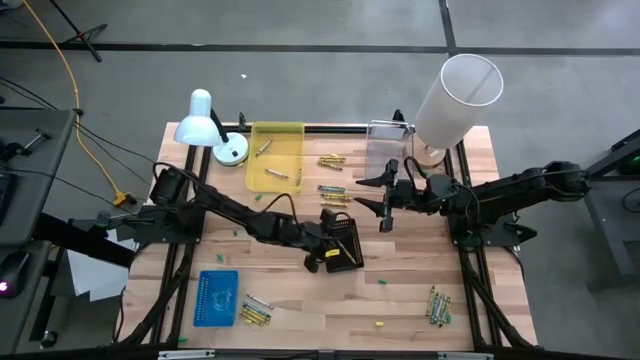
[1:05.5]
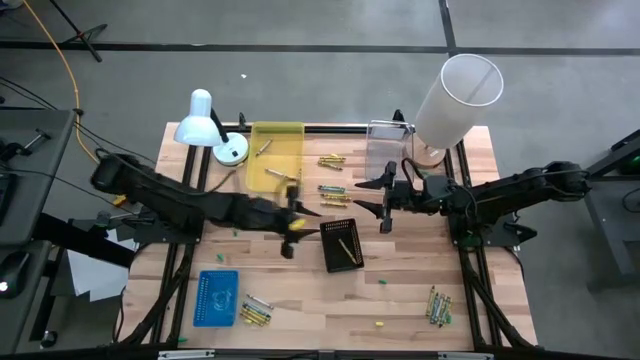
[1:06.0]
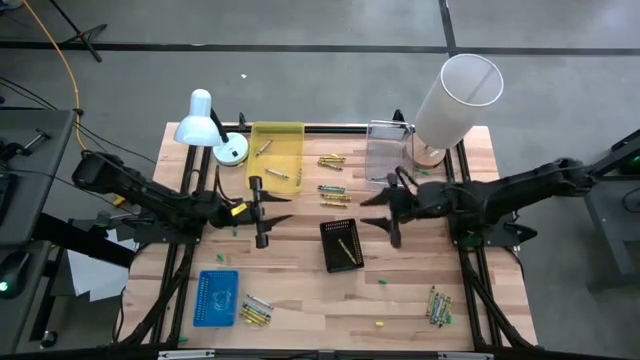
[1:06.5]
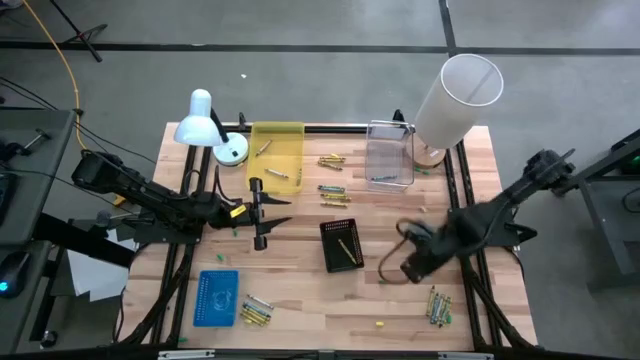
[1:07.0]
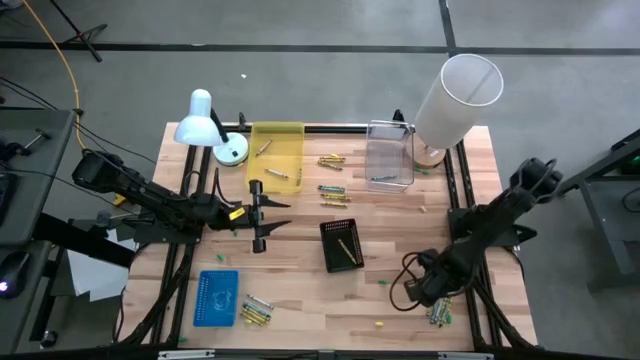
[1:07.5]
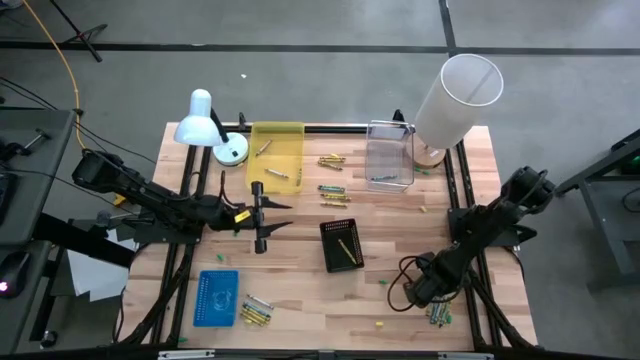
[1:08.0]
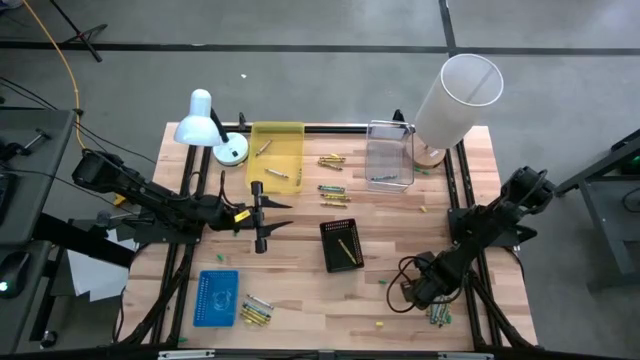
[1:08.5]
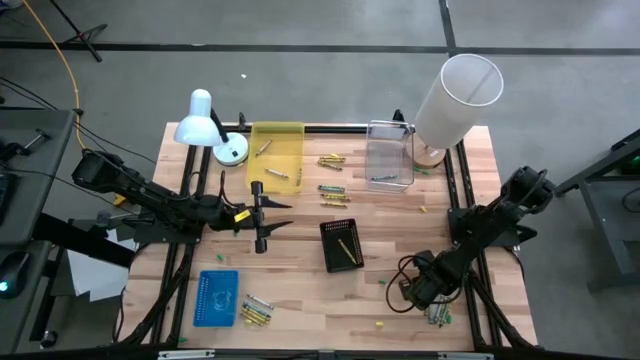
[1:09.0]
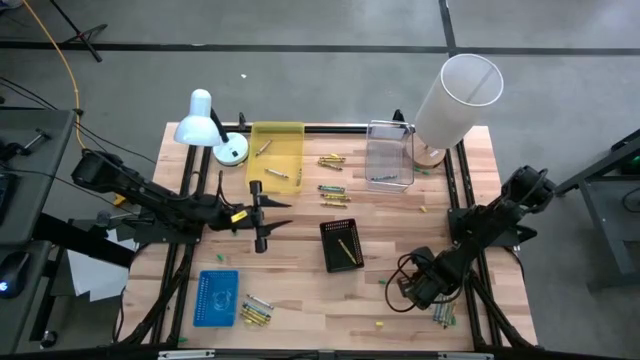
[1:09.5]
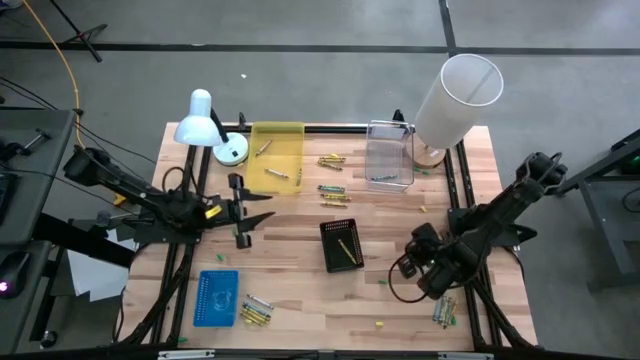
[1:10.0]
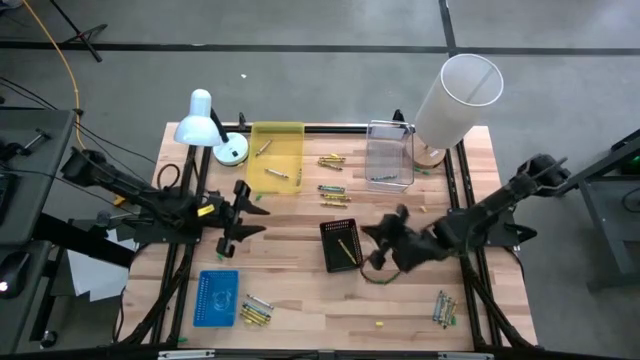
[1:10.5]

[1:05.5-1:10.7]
Task: Sort crayons
Put the green crayon into the blue bin

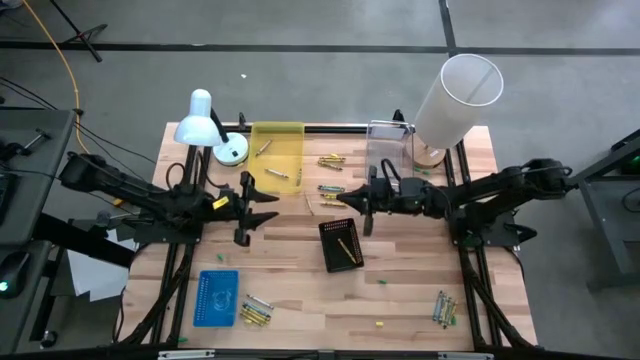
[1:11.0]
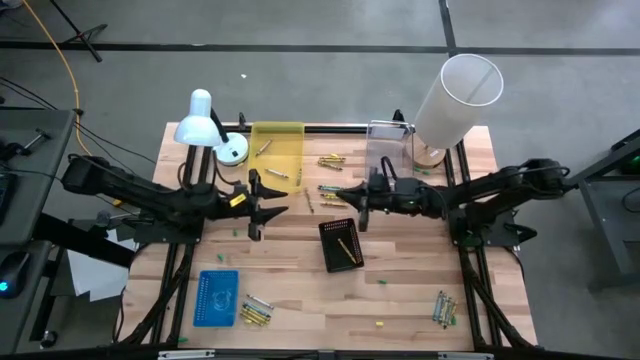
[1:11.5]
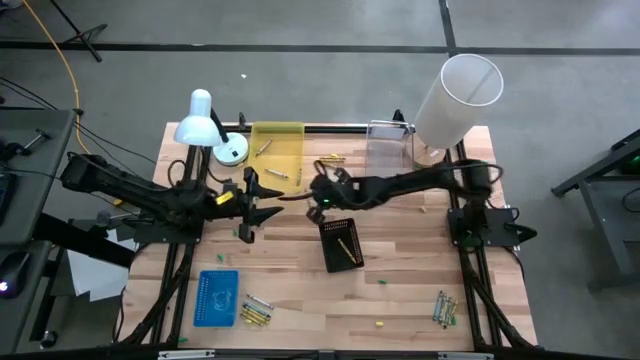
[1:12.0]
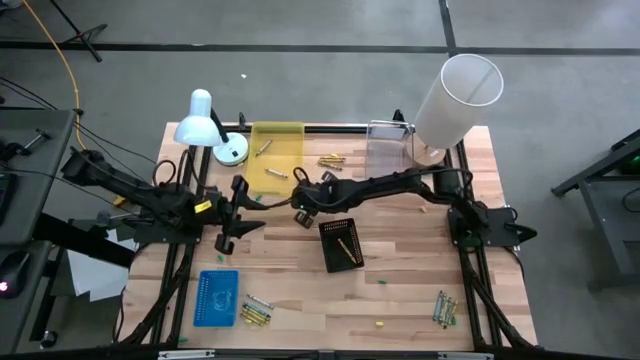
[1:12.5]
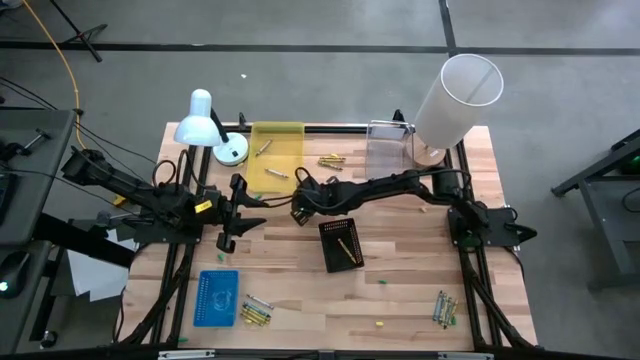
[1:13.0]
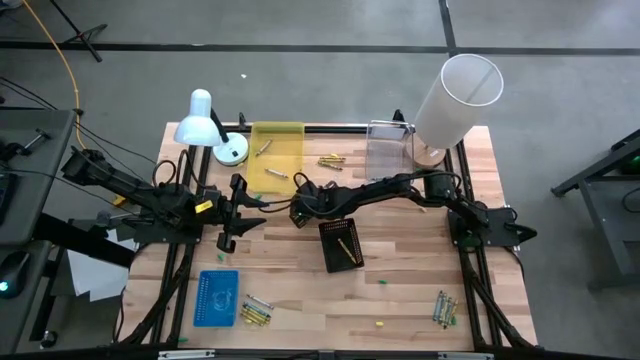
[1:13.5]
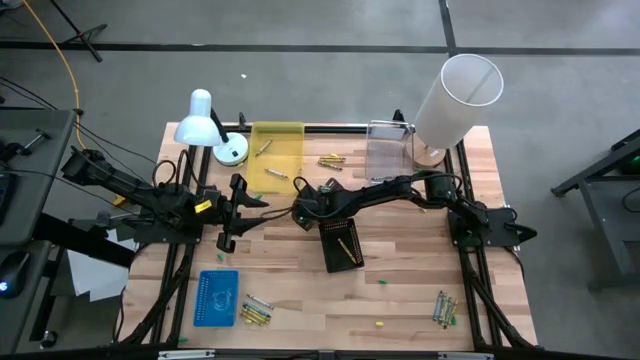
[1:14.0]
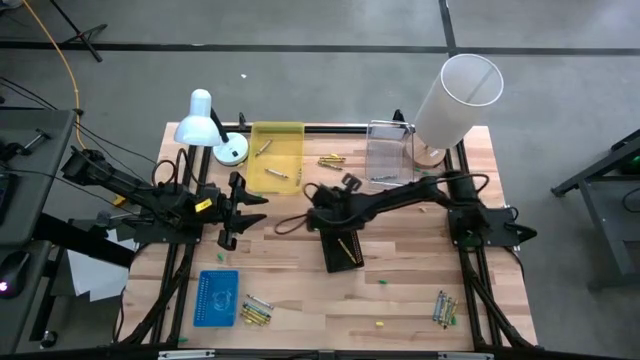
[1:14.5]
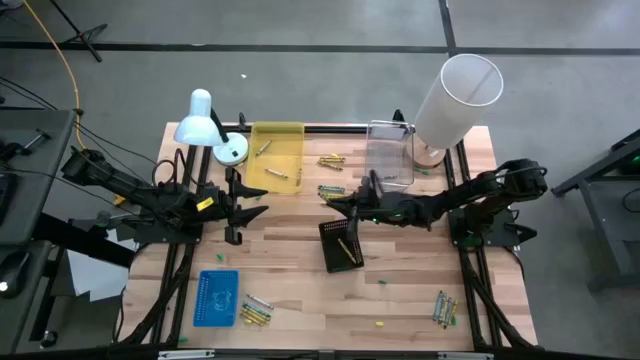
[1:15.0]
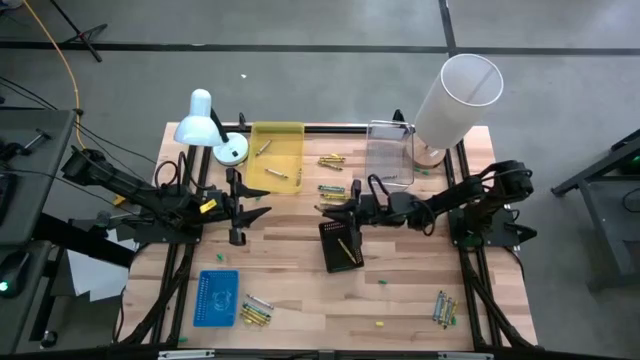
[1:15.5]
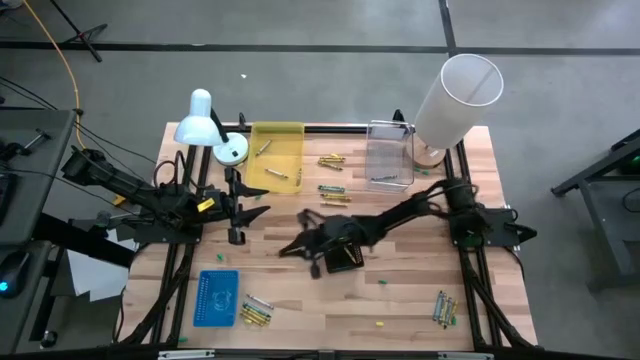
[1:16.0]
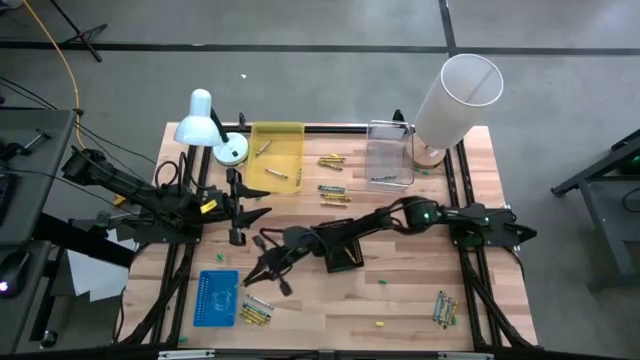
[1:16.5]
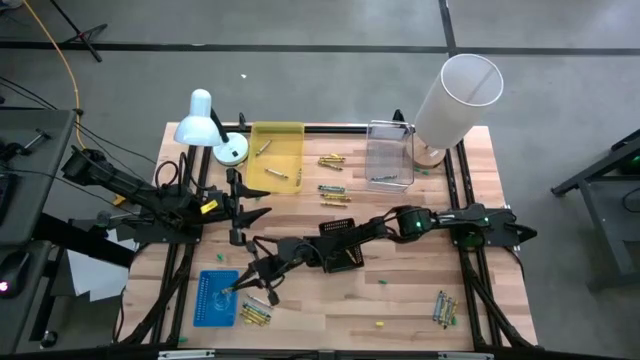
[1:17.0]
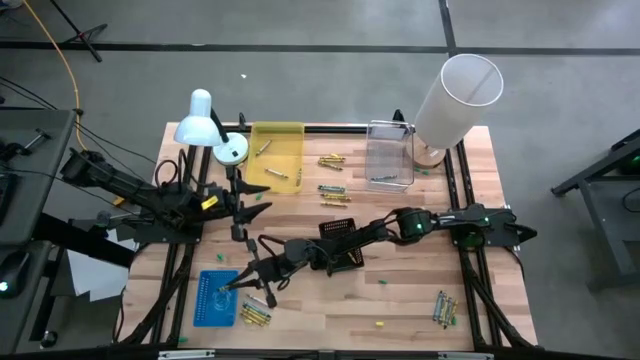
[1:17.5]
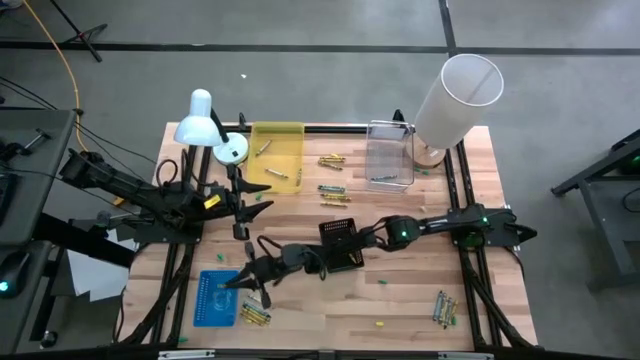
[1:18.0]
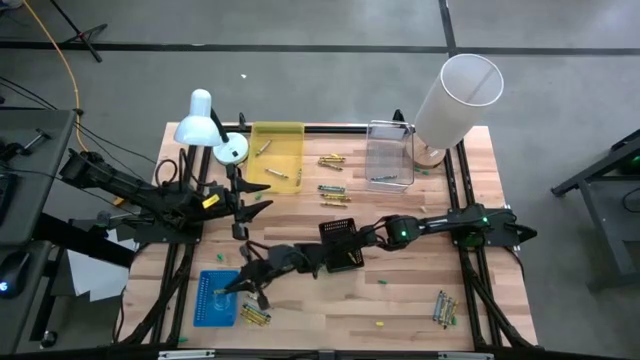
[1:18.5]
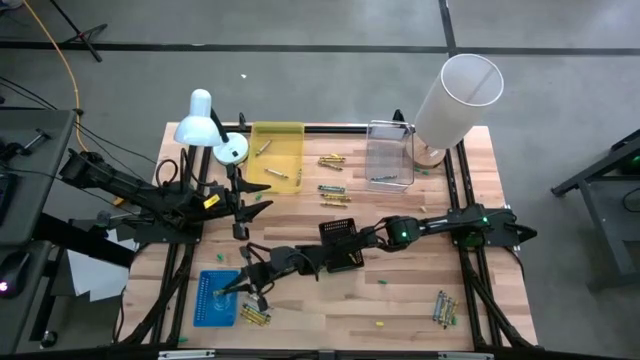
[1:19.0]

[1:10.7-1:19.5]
Put the green crayon into the blue bin

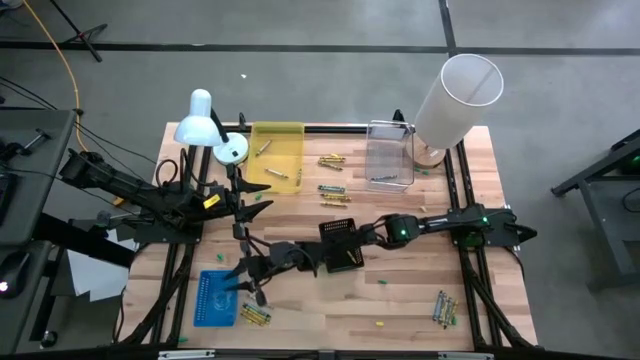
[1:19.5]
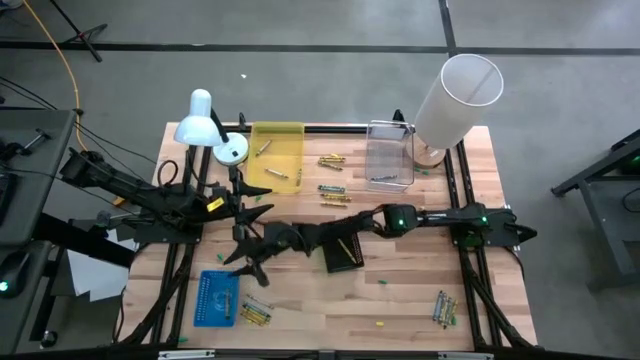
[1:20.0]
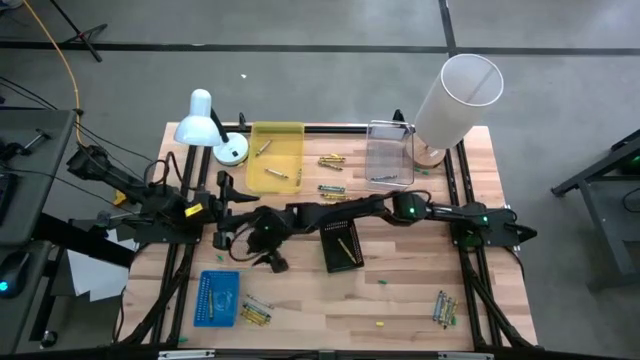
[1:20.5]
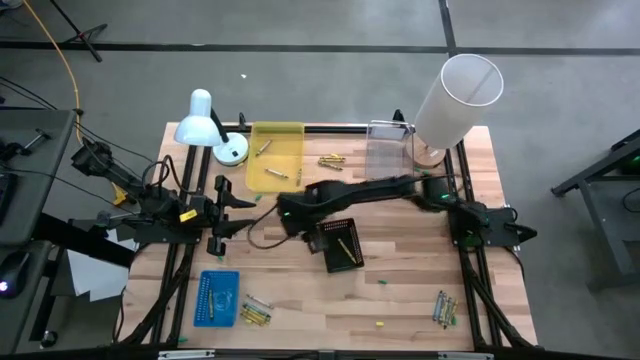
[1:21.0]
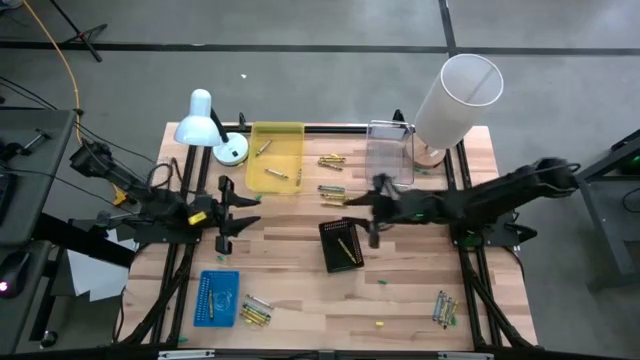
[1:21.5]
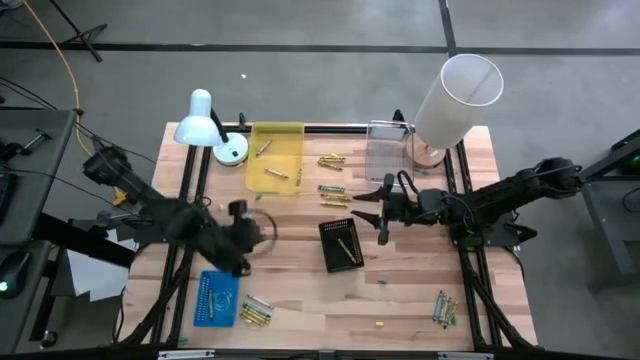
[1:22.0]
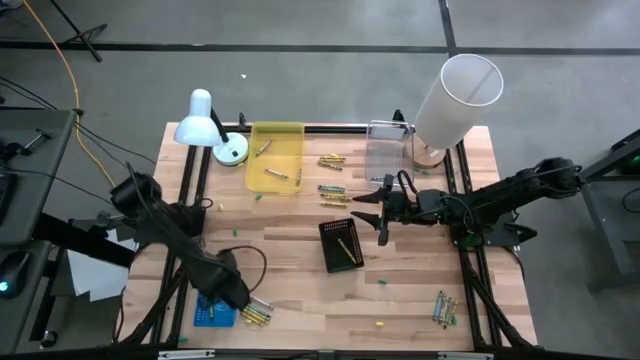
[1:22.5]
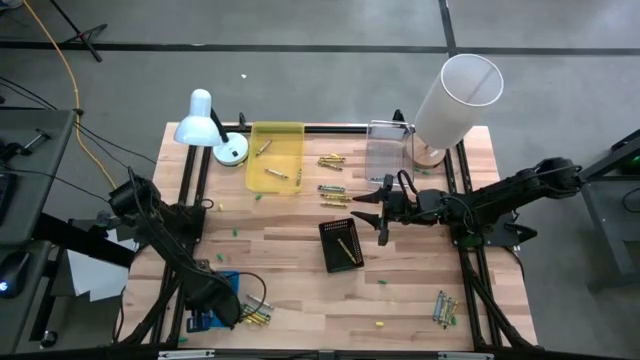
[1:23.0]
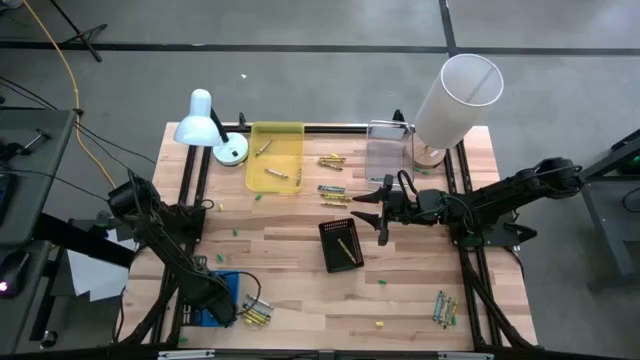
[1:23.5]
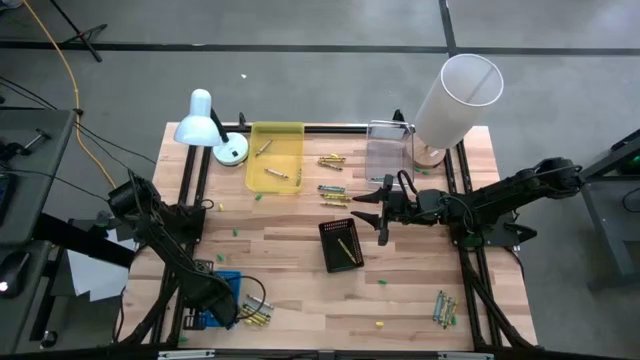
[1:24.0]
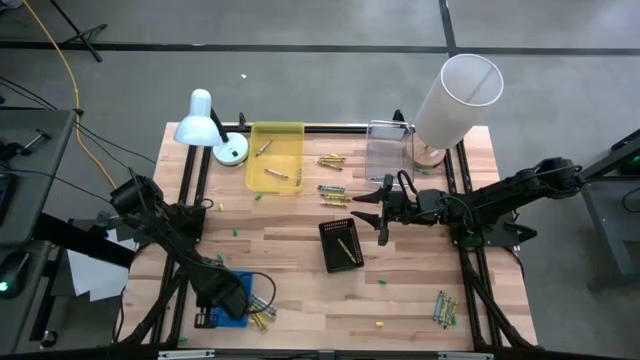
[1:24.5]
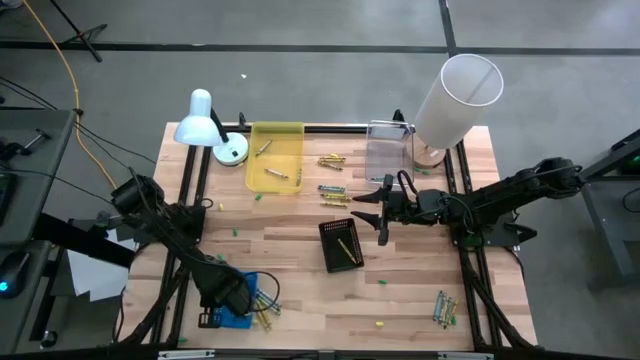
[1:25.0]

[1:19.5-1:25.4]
Adjust the blue bin

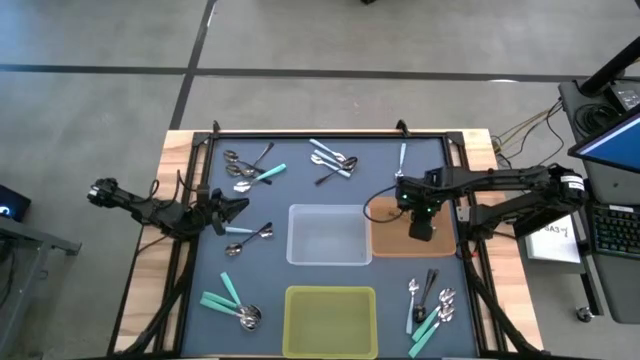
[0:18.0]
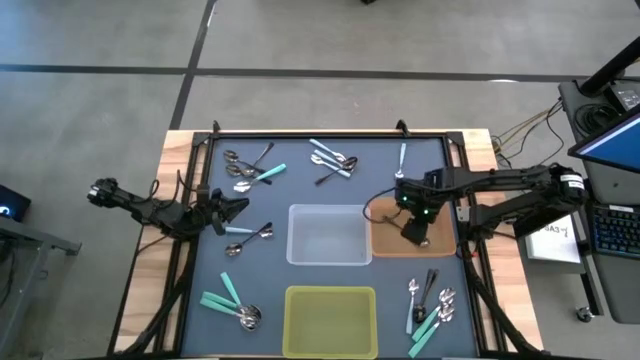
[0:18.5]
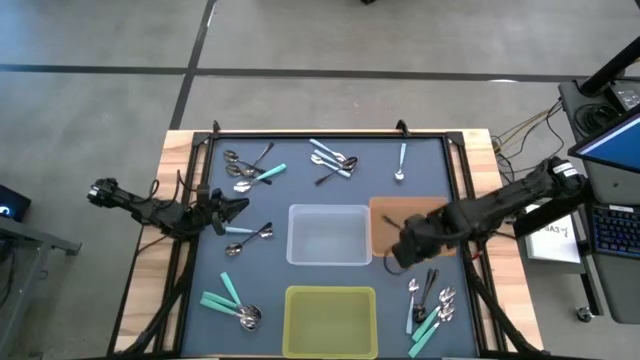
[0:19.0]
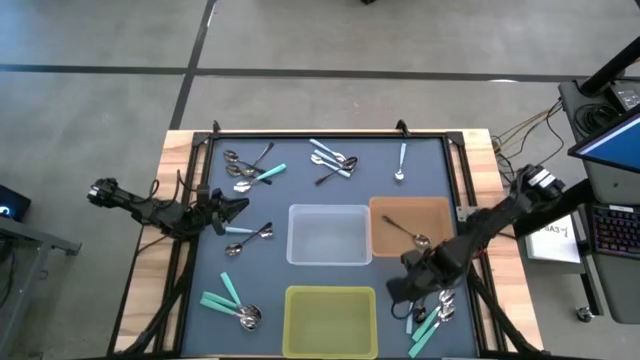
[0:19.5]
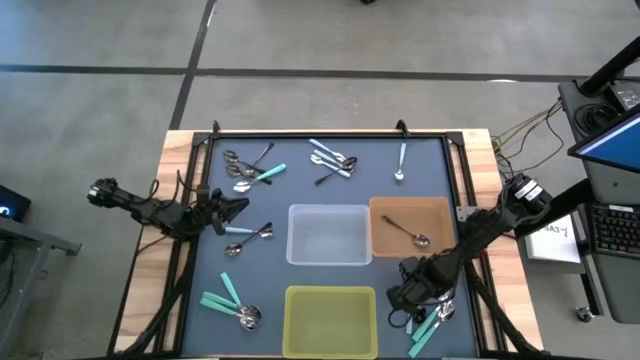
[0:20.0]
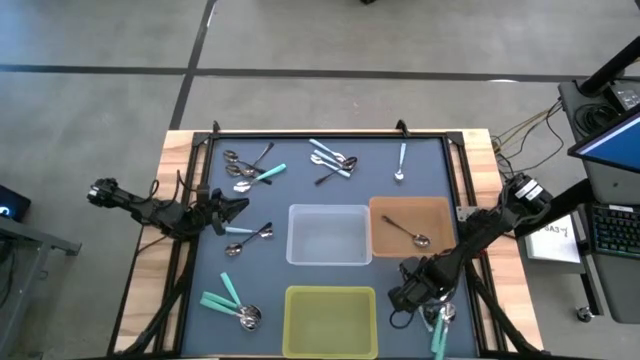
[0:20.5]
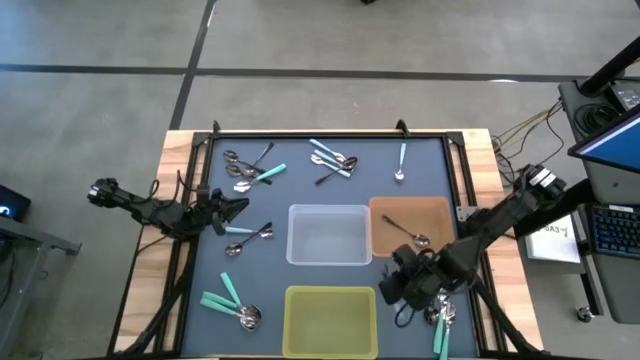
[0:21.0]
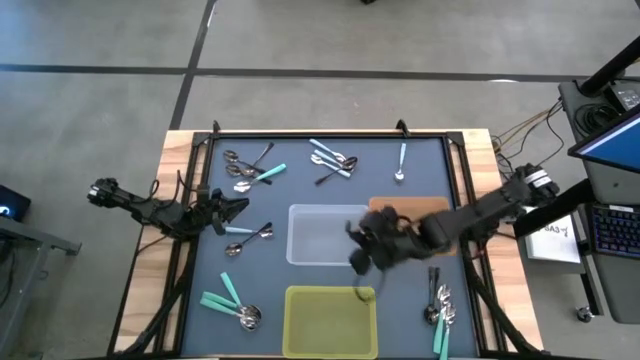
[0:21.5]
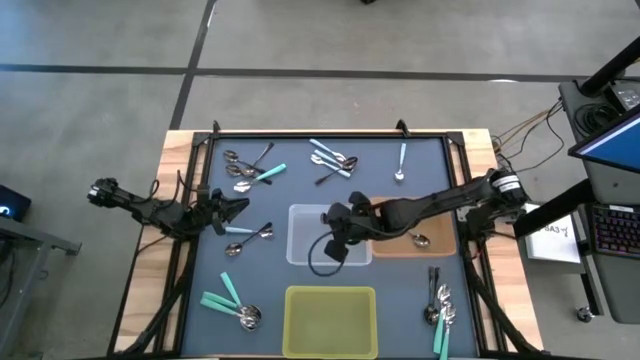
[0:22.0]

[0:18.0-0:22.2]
Task: Sort silverware by color (type)
Put the light blue spoon into the transparent bin
